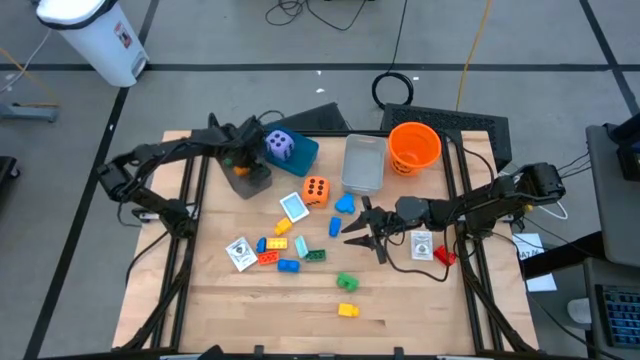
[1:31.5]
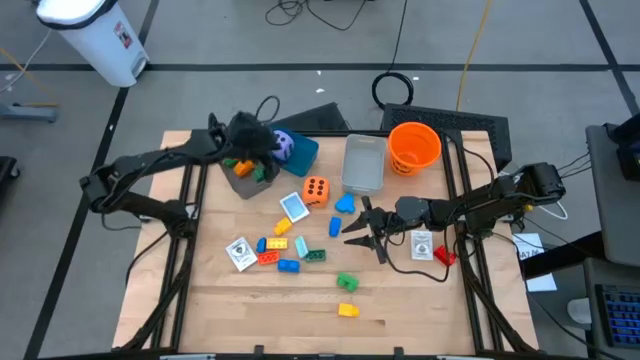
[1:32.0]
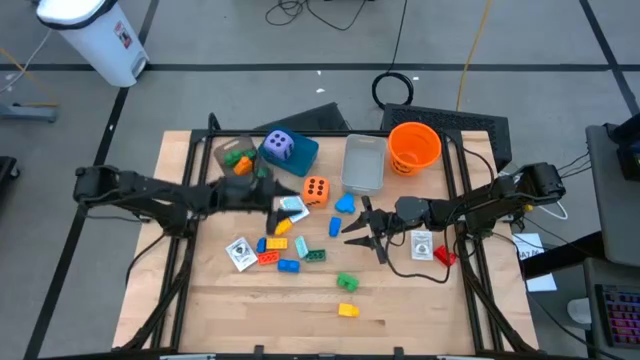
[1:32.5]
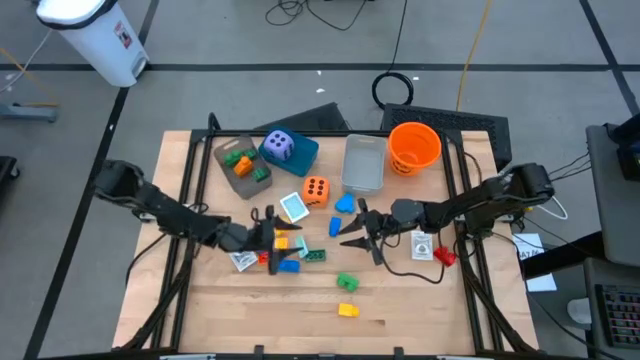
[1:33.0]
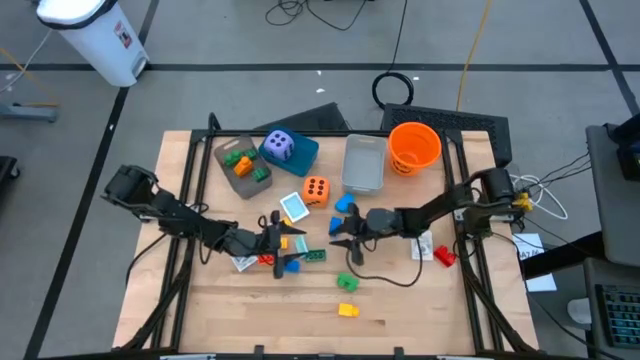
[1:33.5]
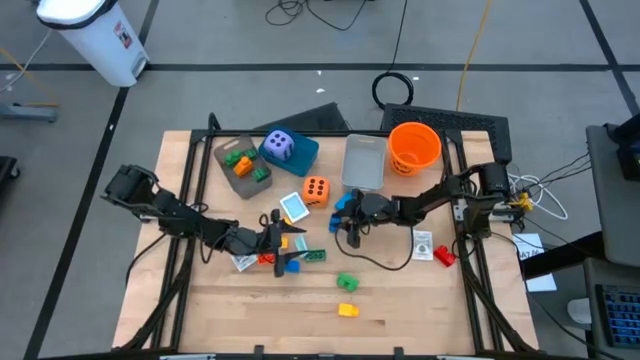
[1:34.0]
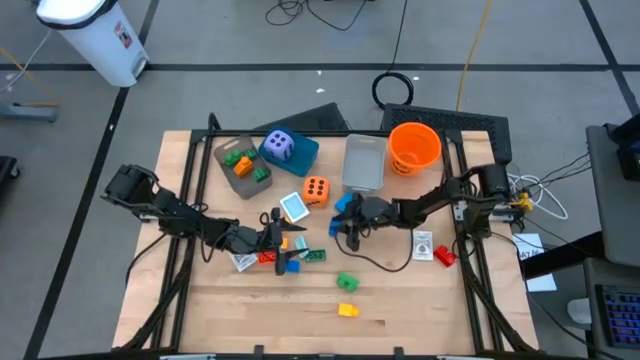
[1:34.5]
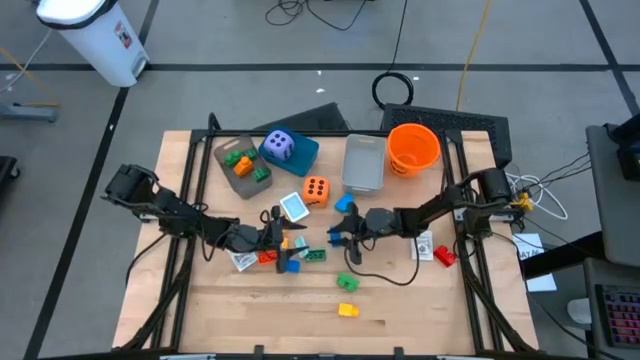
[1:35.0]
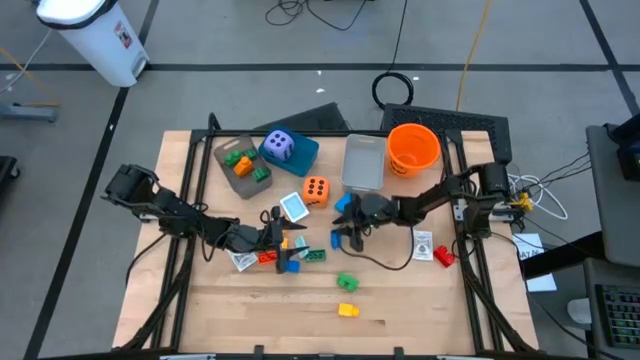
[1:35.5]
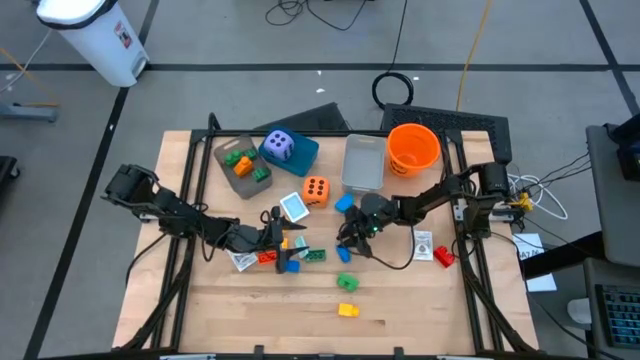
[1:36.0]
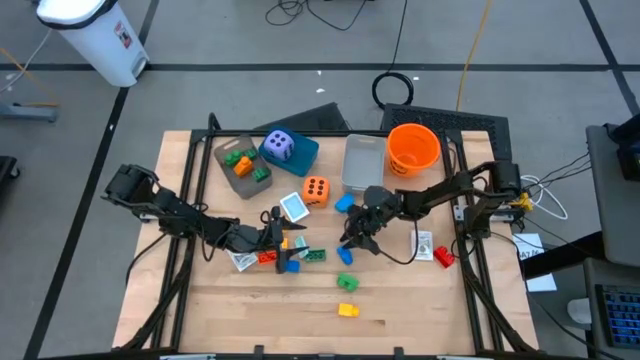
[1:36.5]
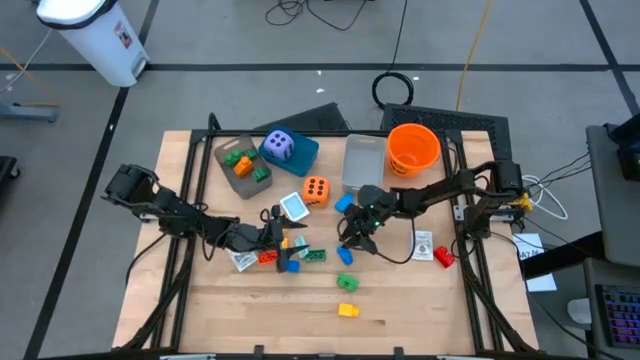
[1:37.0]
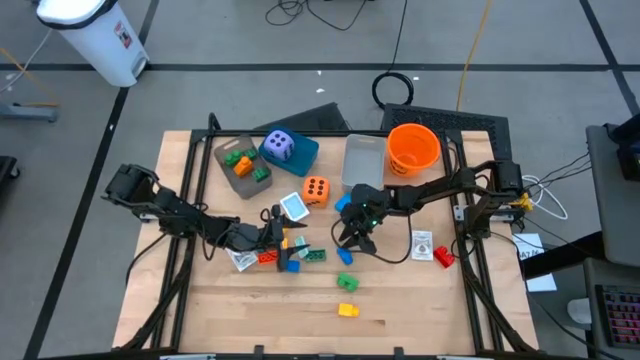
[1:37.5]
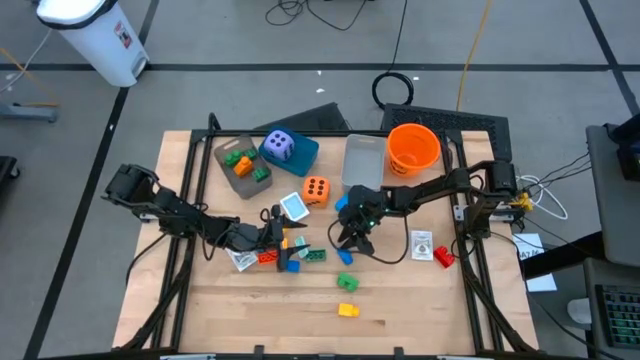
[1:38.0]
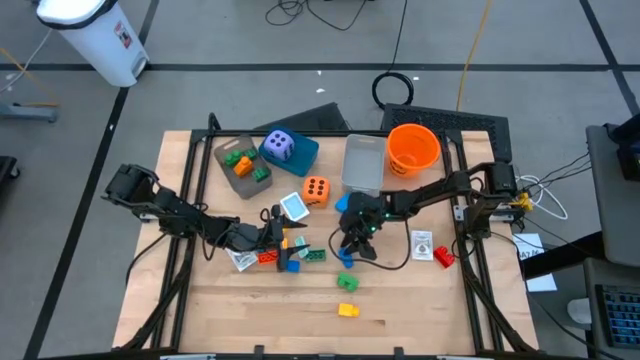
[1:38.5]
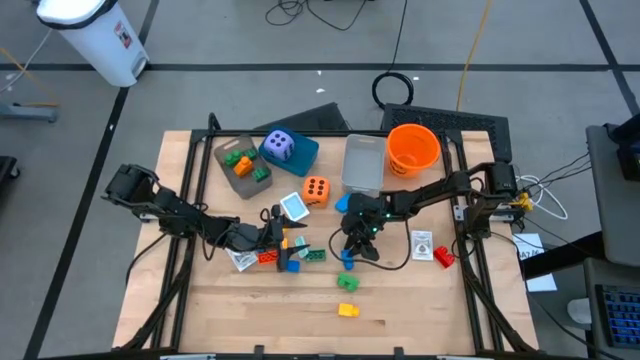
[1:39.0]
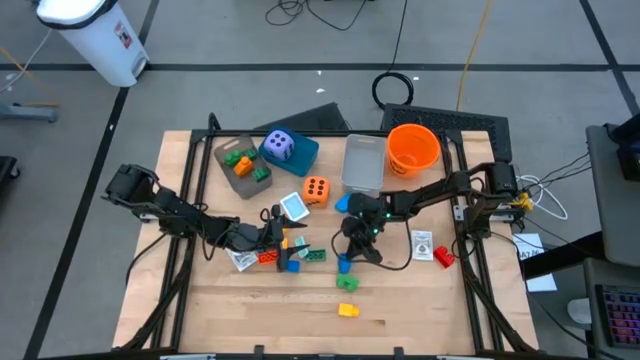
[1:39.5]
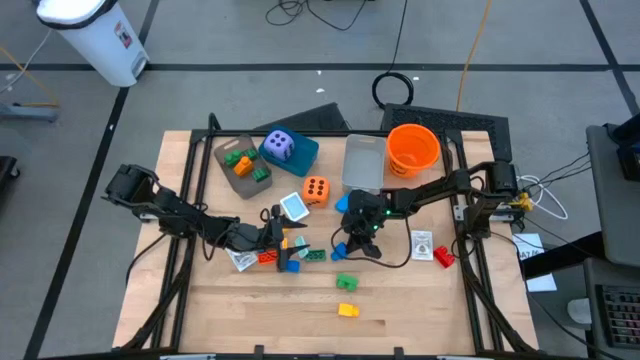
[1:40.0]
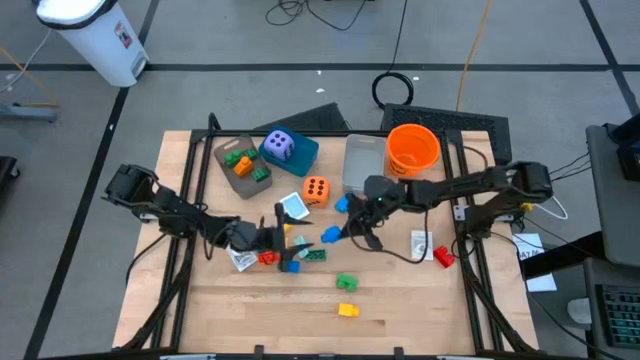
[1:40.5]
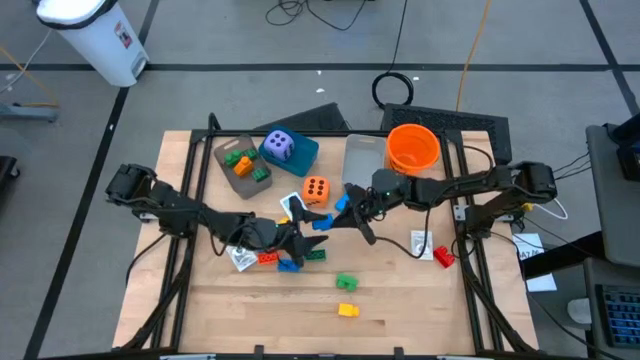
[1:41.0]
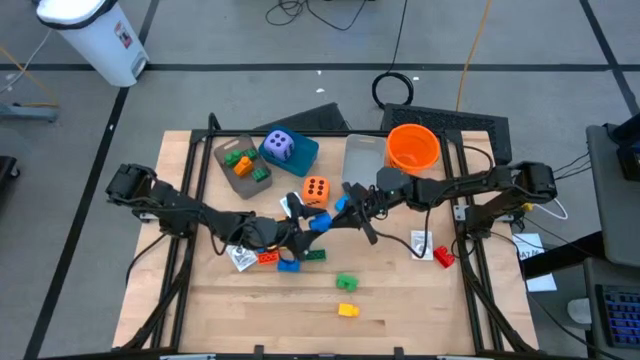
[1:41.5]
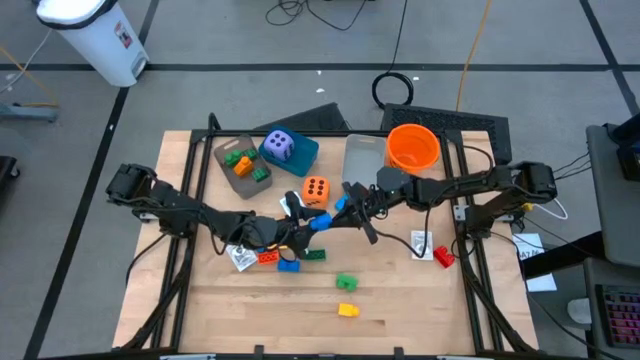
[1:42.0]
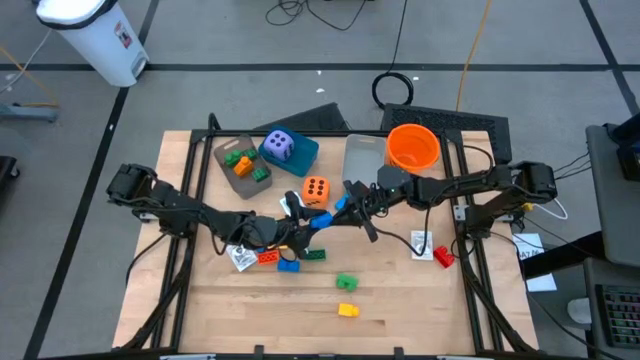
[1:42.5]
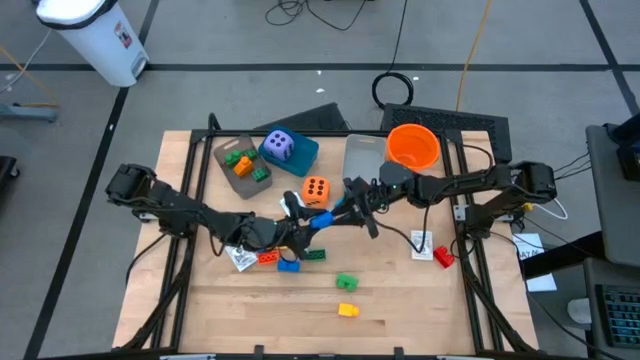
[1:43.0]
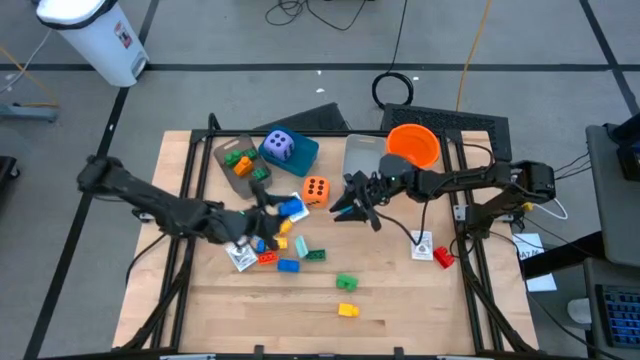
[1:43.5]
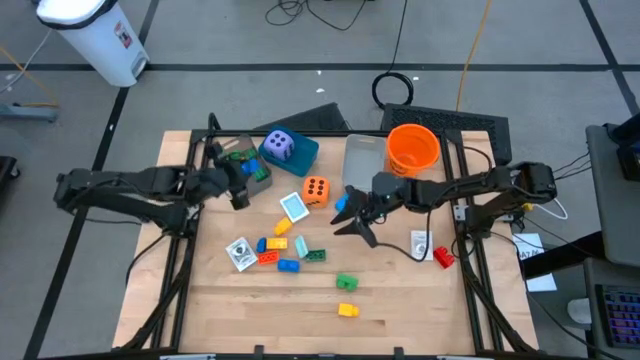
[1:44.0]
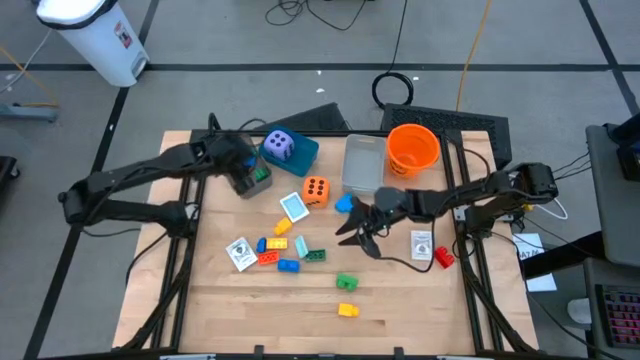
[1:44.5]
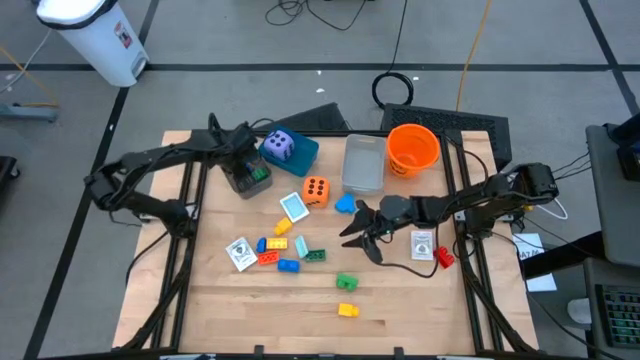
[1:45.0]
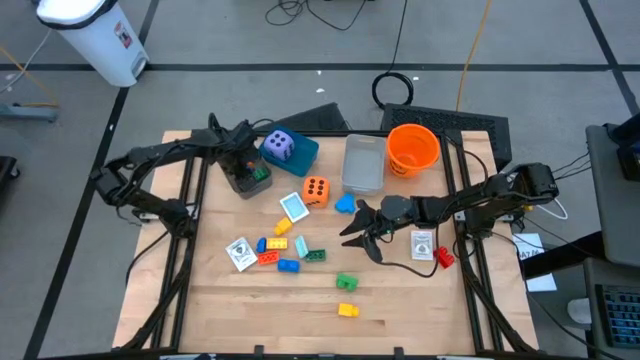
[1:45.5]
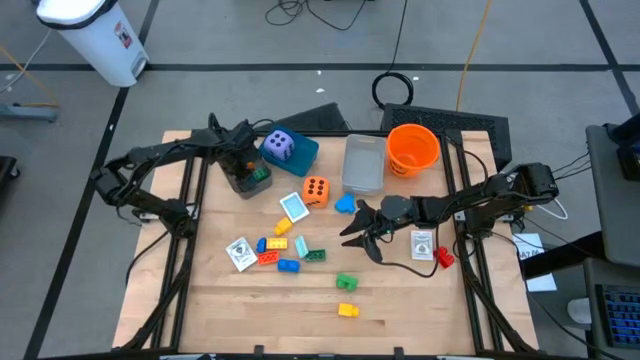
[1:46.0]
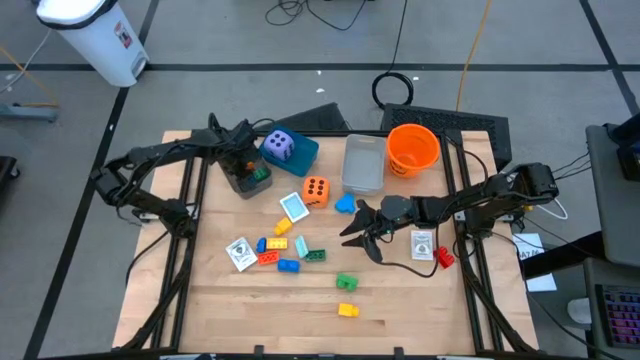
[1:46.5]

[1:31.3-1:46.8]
Task: Pick & Place Toys
Put the blue game piece into the black bin

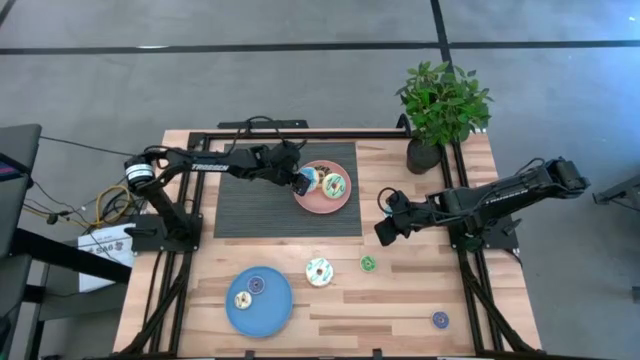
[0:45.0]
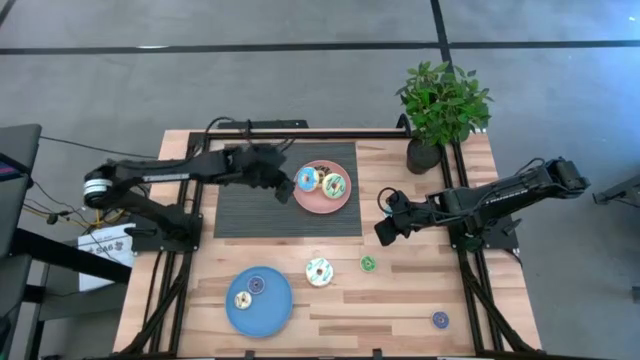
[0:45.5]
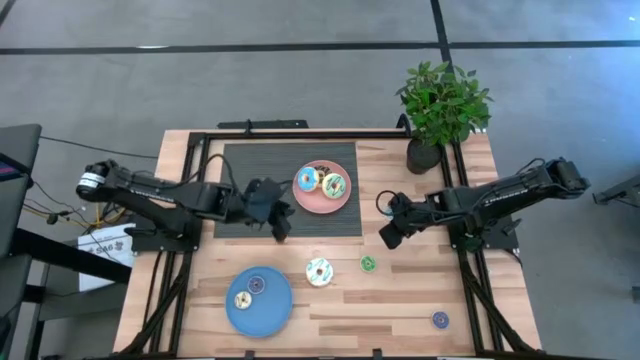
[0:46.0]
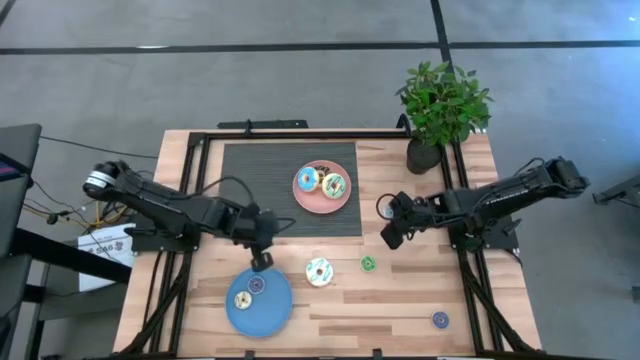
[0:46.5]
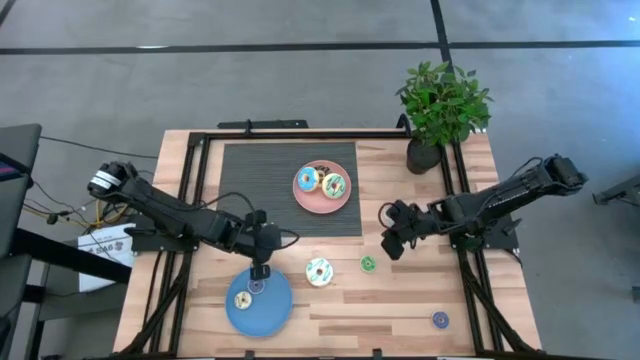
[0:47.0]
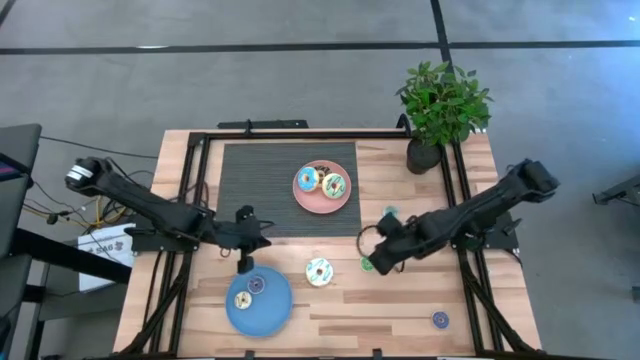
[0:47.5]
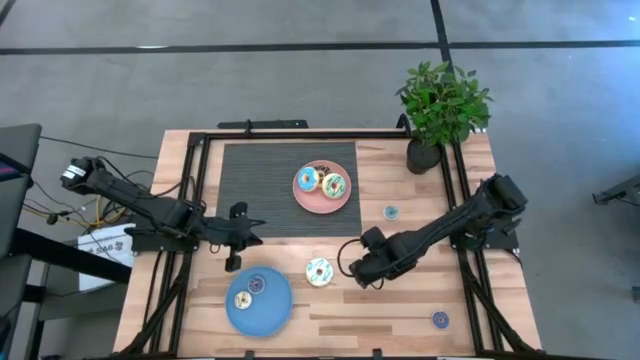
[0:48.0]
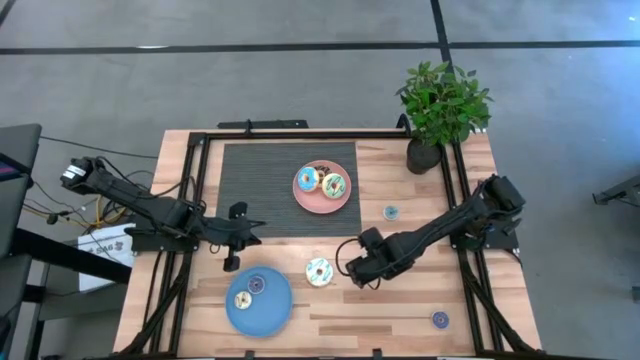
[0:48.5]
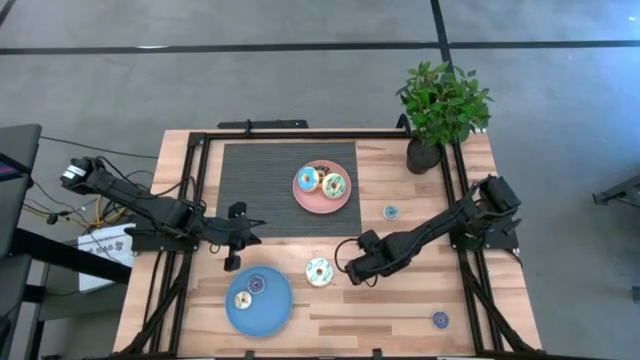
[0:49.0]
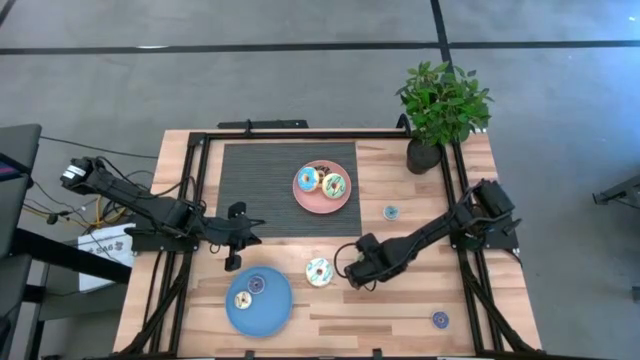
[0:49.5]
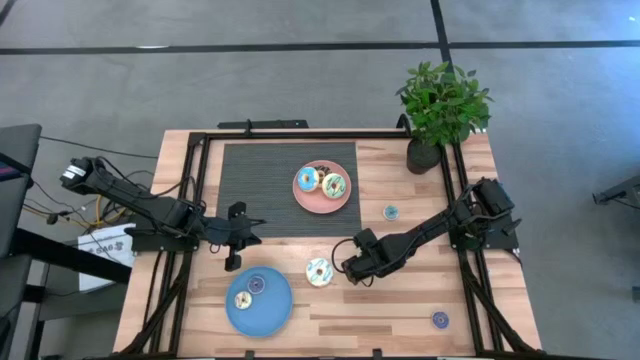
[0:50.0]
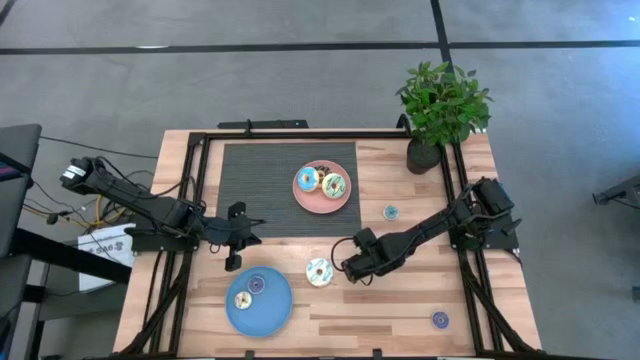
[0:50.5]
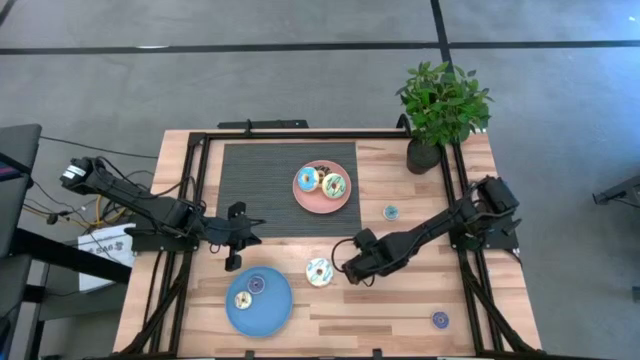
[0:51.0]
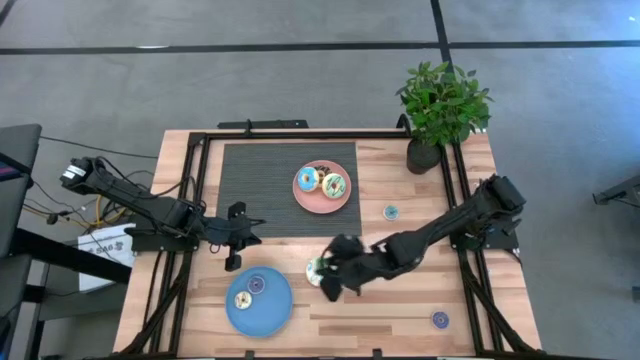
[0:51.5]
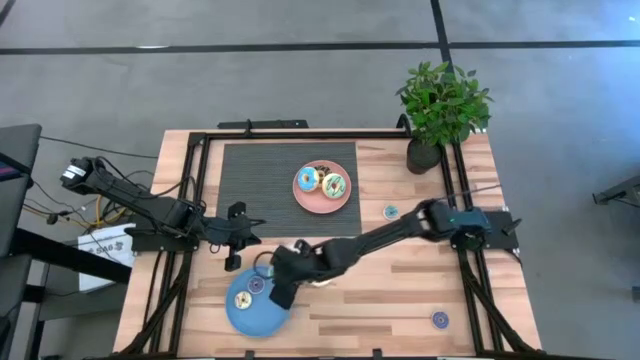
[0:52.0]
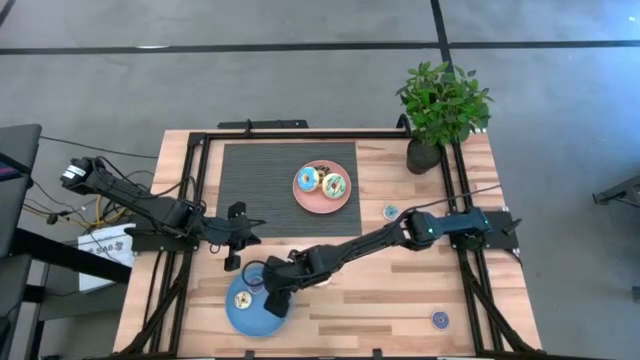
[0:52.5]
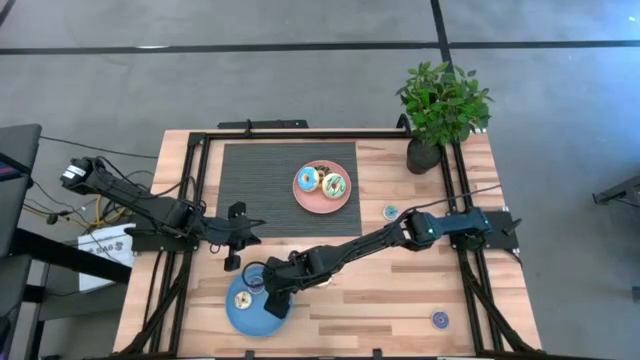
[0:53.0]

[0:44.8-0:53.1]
Task: Pick & Place donuts
Put the small green donut on the blue plate
